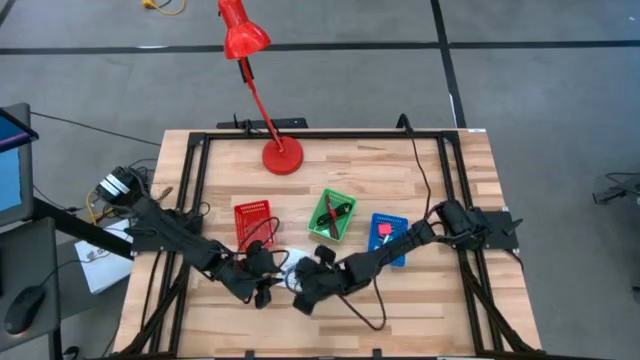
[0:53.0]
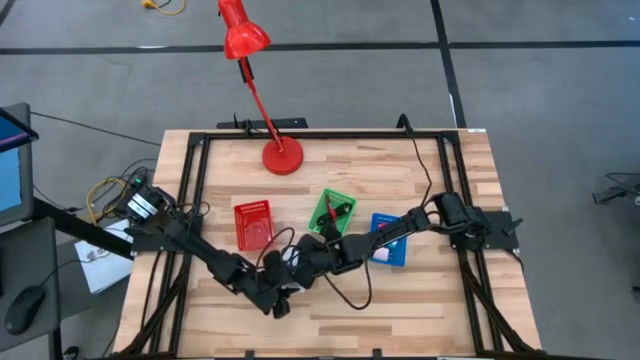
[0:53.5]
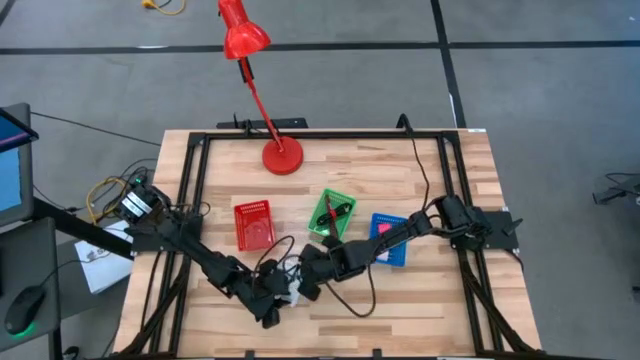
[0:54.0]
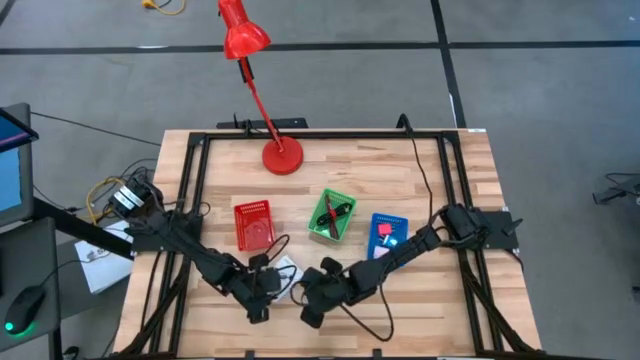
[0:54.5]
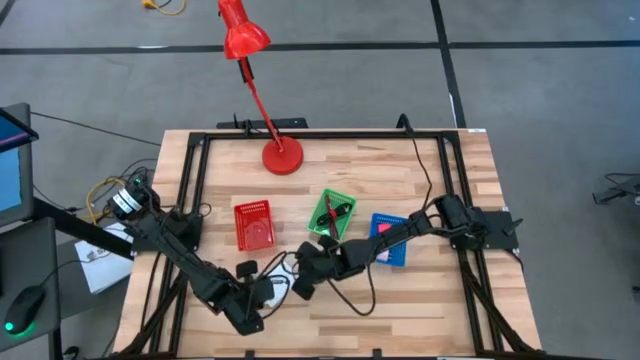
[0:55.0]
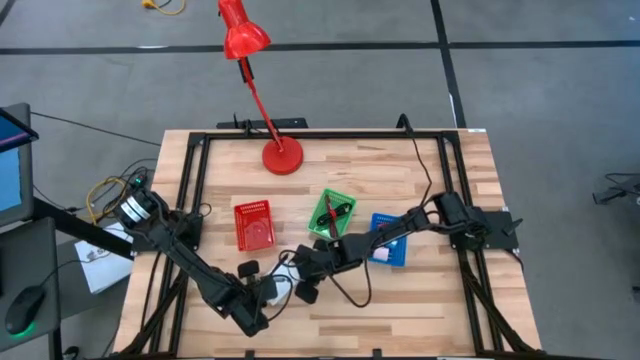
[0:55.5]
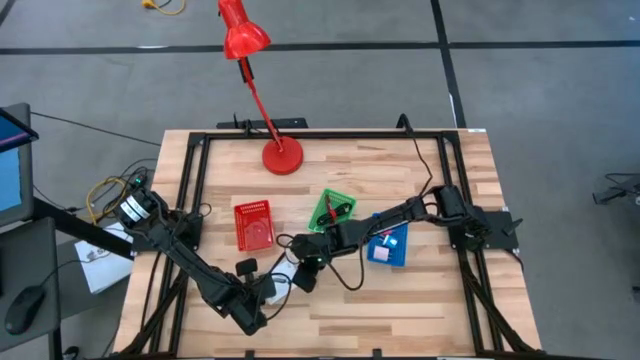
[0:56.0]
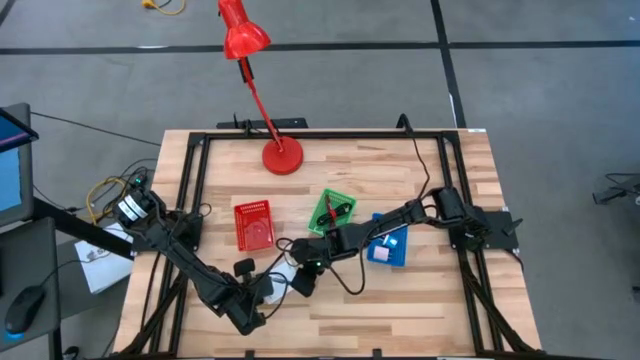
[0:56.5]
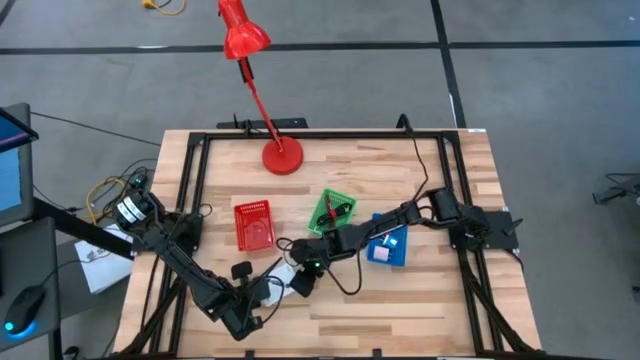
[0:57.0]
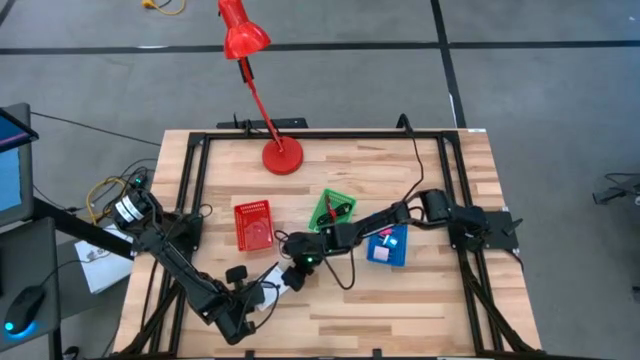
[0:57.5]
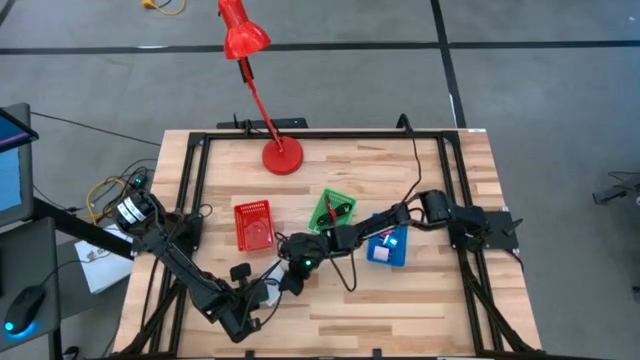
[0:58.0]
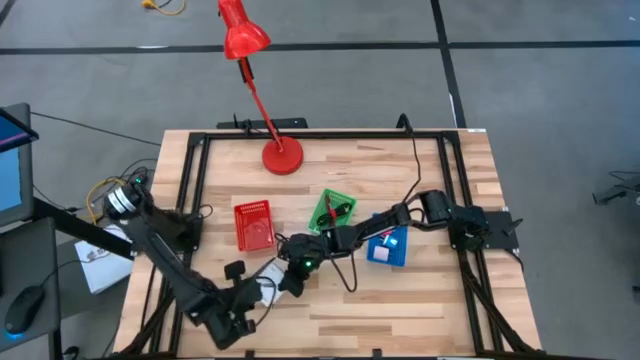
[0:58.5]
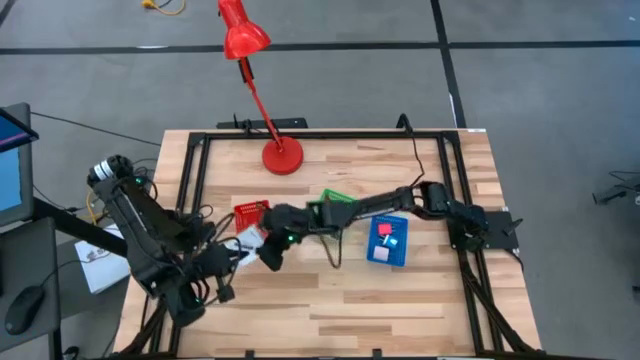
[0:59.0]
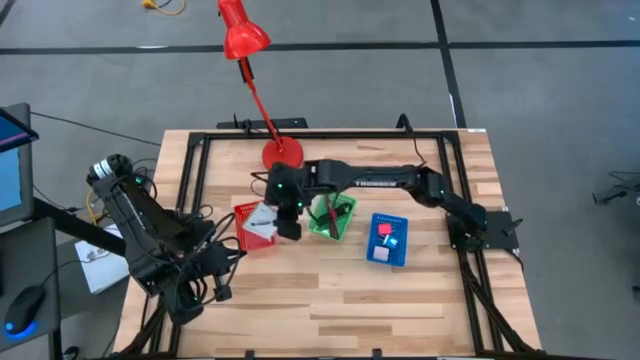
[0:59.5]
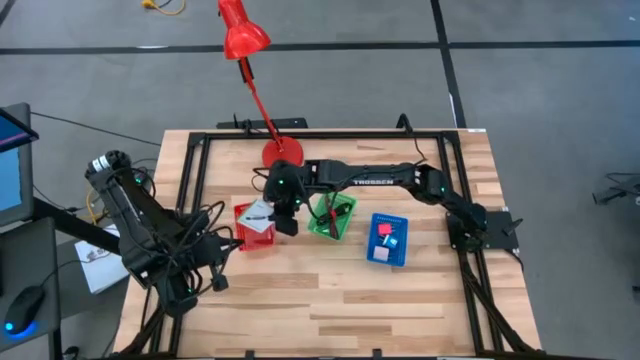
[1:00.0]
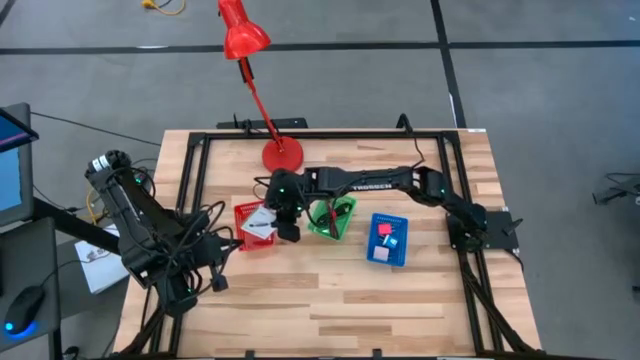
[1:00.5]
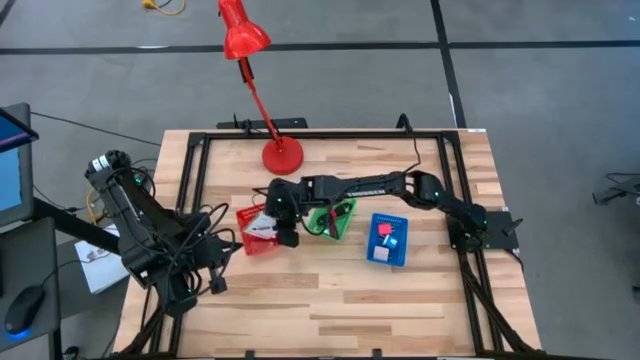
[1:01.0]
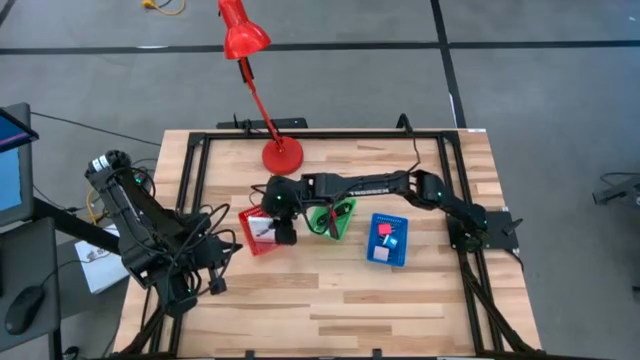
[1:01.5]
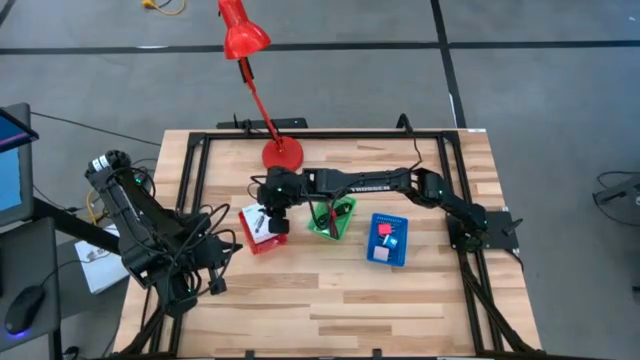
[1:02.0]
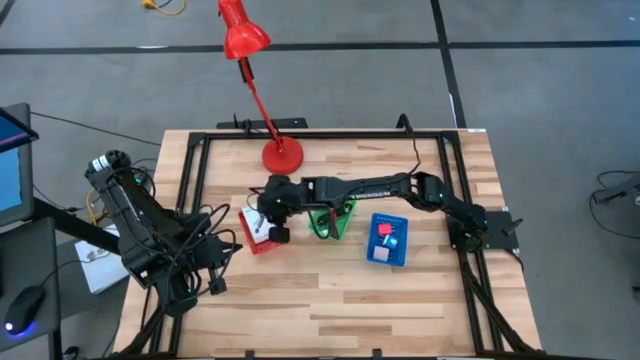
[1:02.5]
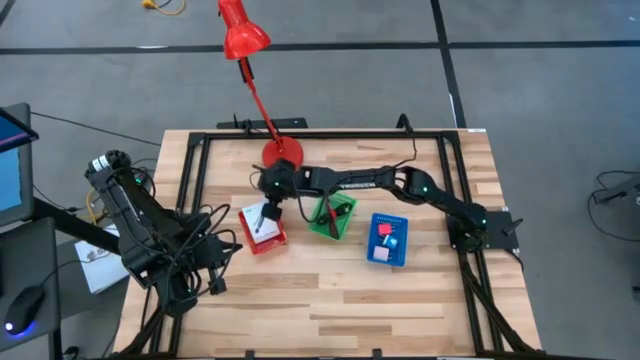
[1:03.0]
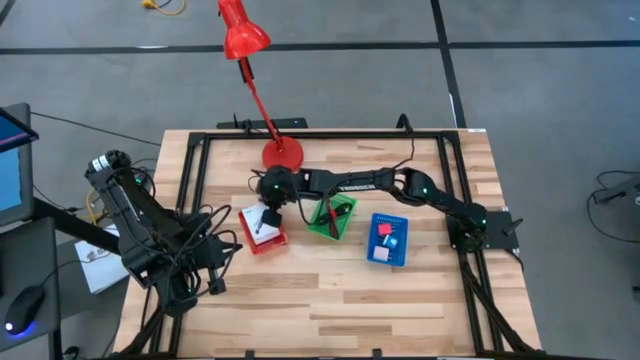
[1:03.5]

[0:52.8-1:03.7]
Task: Pick and place items into bin
Put the white card reader box into the orange bin

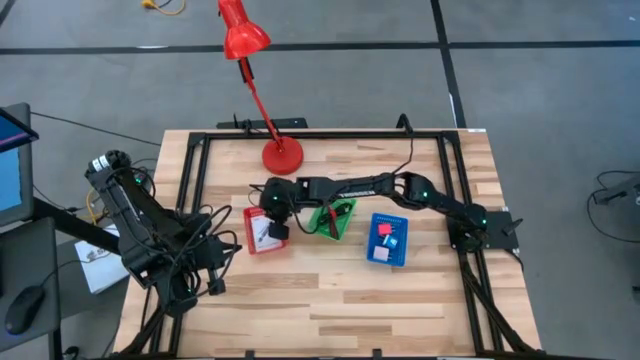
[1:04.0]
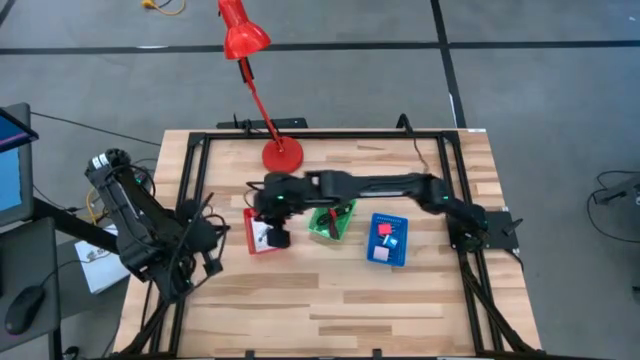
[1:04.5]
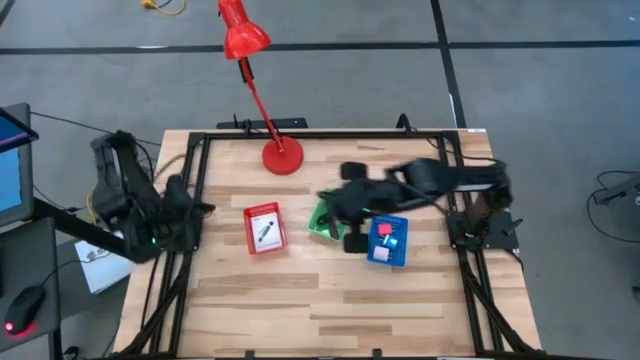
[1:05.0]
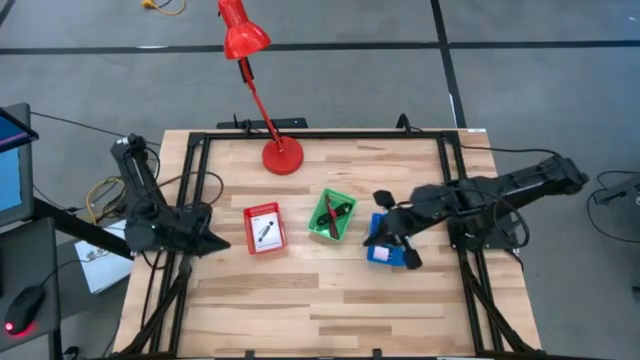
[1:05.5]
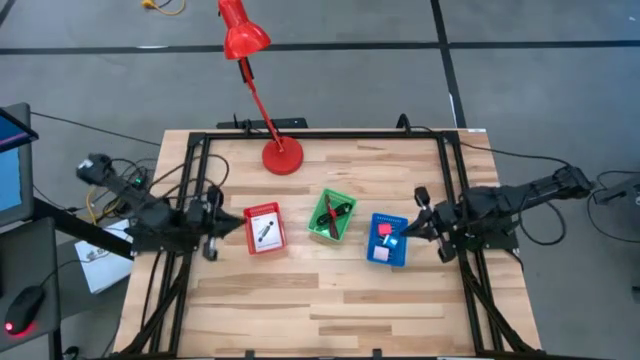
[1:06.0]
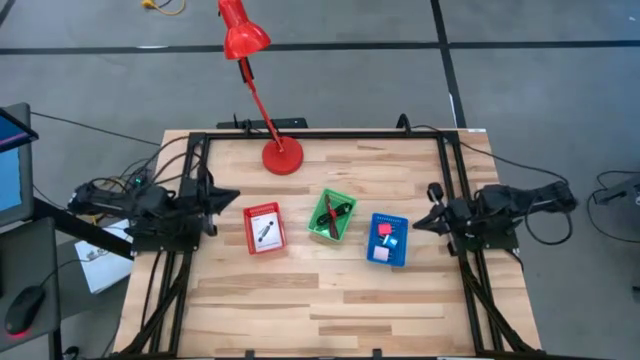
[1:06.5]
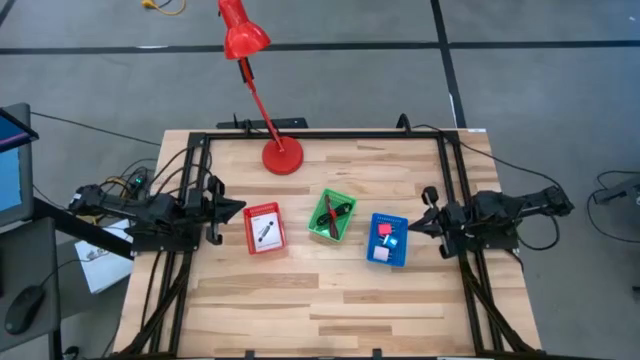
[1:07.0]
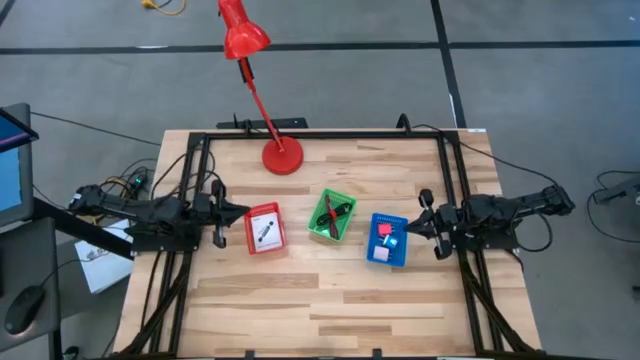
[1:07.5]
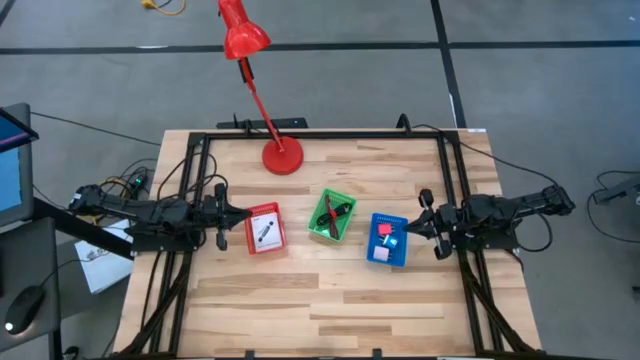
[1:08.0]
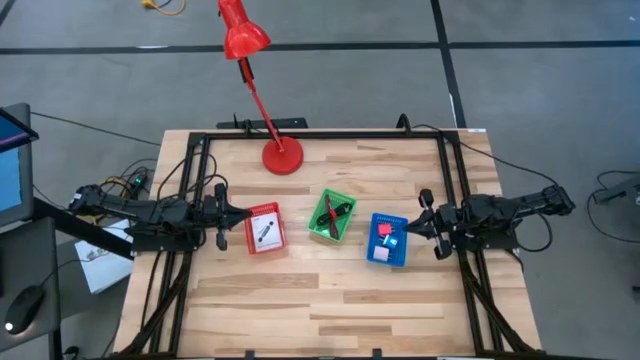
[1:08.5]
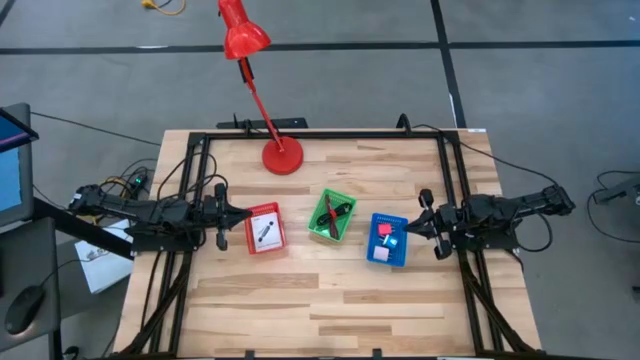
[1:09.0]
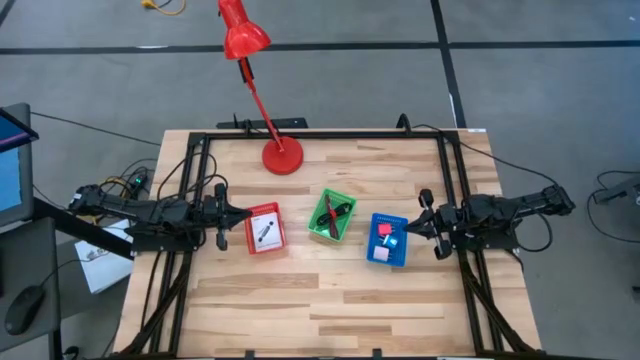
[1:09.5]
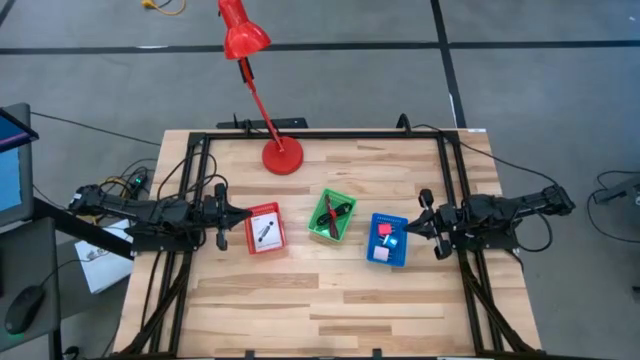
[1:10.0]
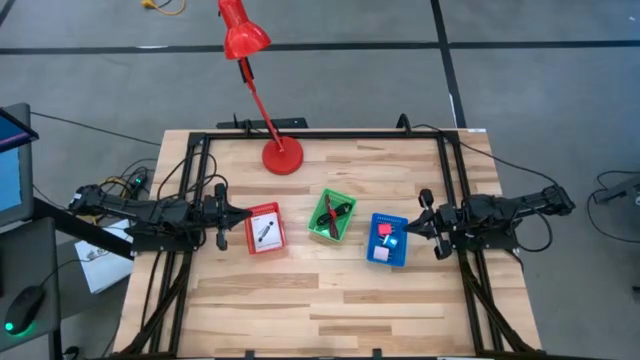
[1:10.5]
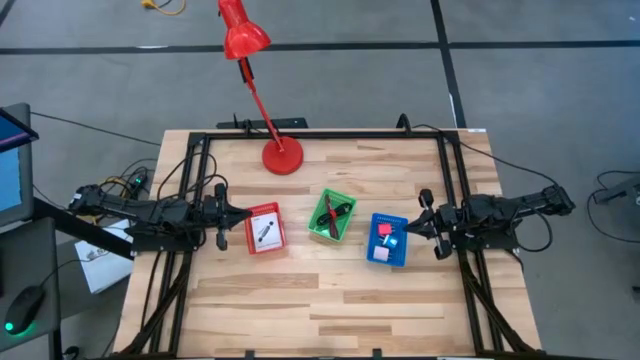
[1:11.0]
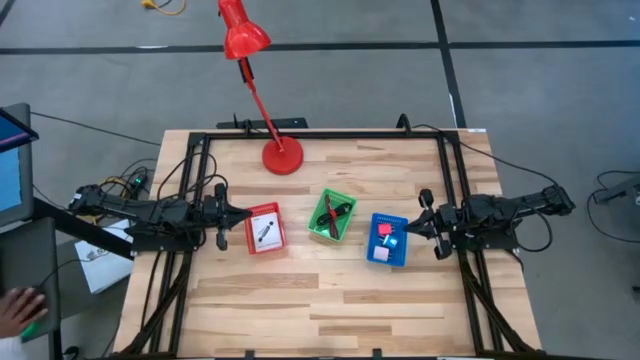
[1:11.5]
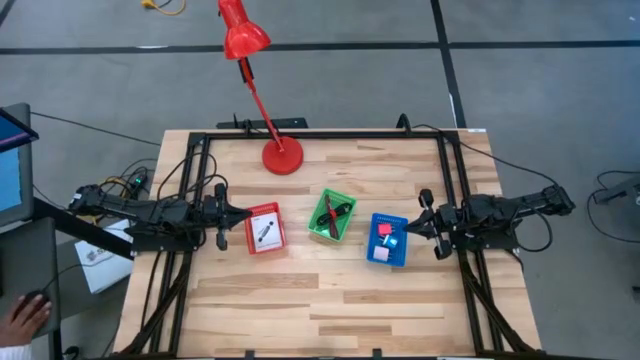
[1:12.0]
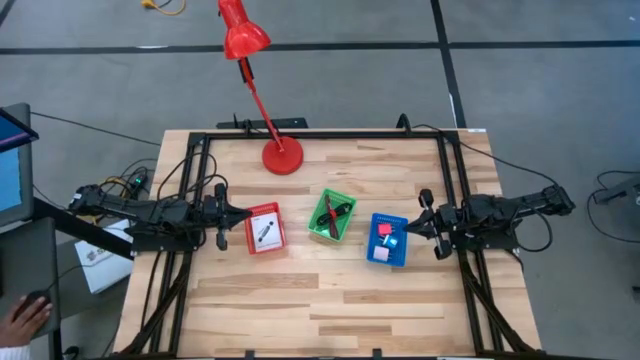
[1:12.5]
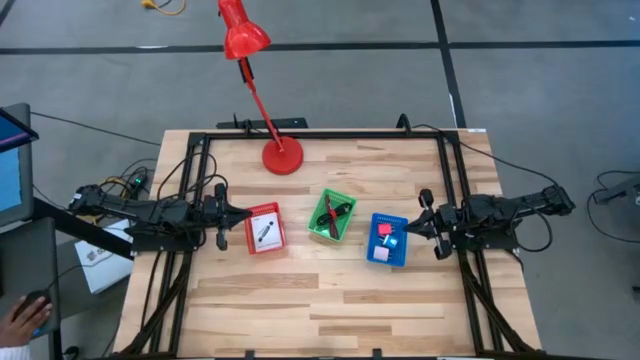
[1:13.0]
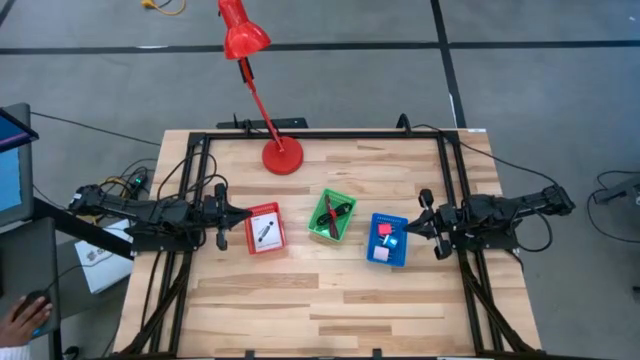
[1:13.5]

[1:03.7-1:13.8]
Return to Home Position
